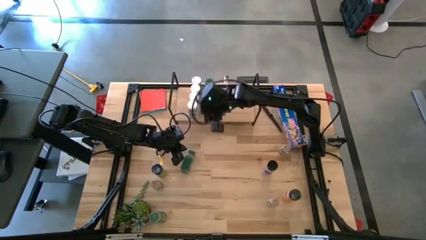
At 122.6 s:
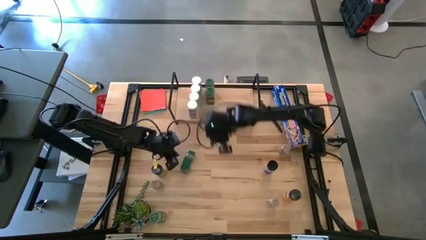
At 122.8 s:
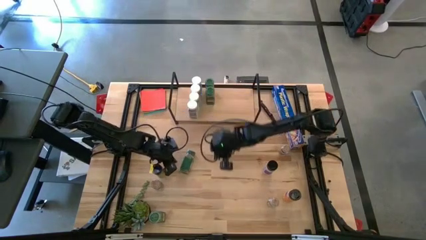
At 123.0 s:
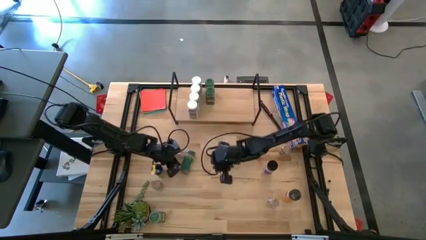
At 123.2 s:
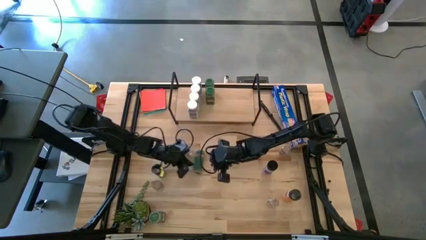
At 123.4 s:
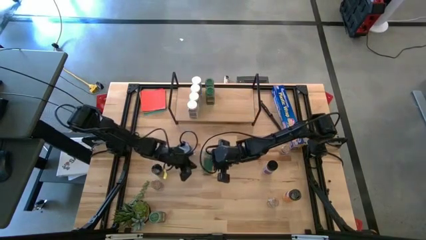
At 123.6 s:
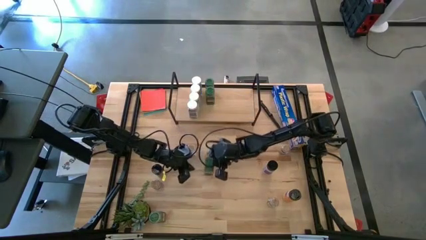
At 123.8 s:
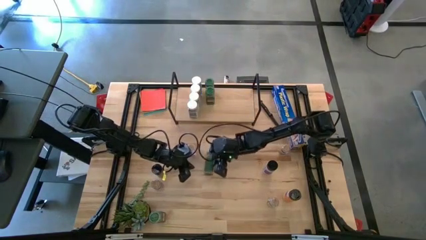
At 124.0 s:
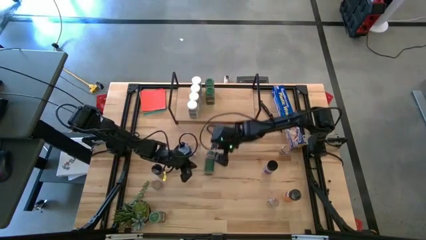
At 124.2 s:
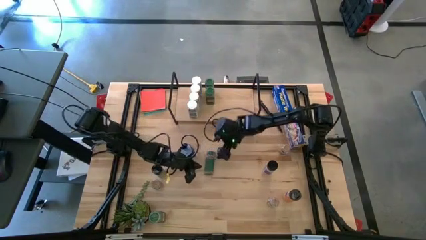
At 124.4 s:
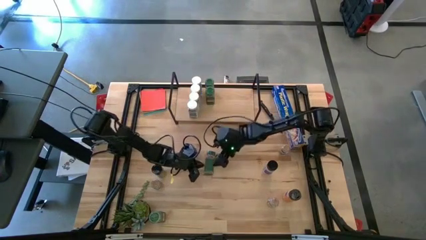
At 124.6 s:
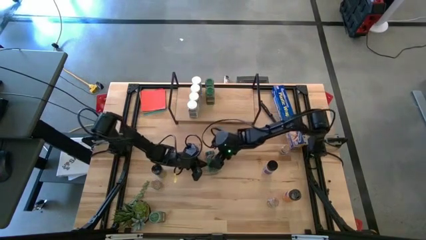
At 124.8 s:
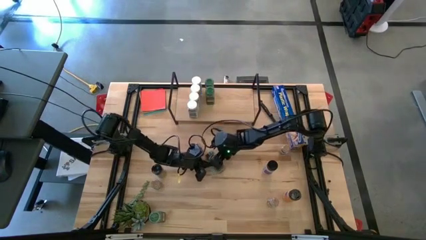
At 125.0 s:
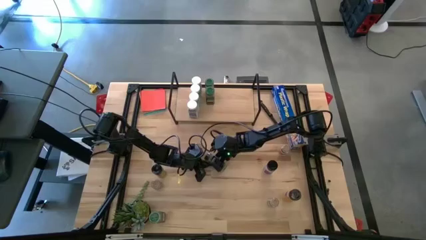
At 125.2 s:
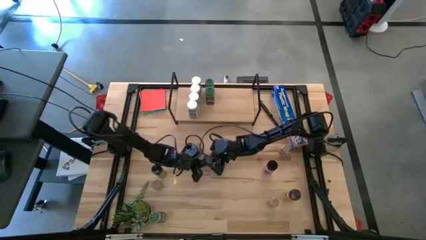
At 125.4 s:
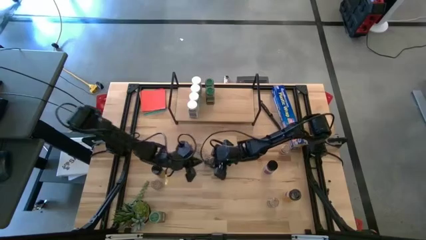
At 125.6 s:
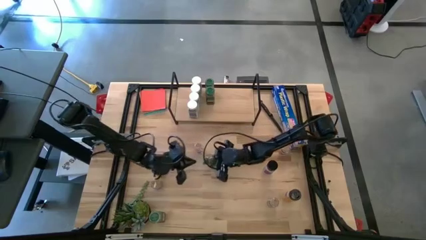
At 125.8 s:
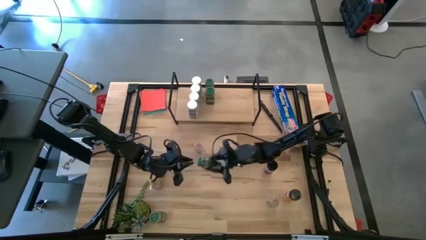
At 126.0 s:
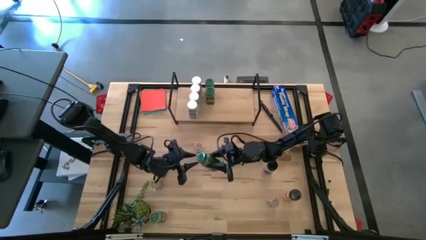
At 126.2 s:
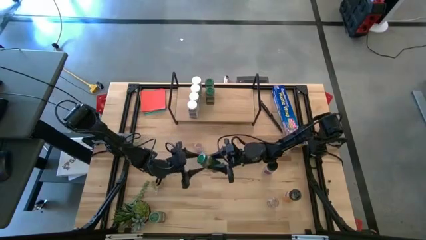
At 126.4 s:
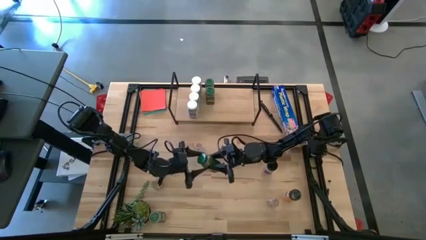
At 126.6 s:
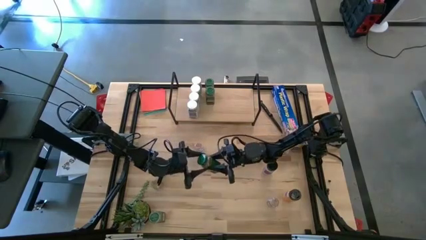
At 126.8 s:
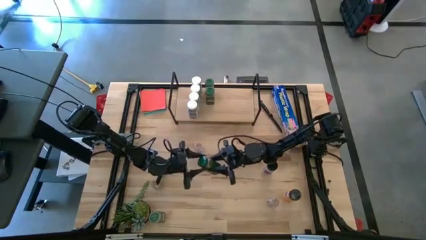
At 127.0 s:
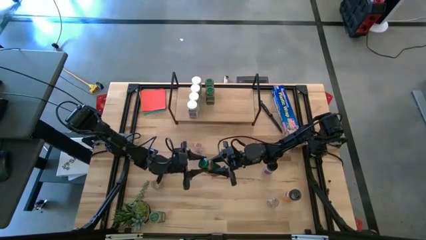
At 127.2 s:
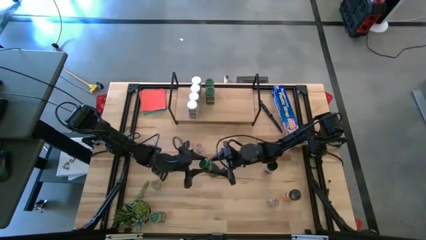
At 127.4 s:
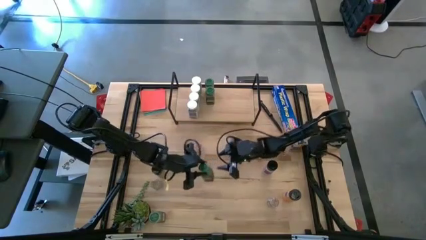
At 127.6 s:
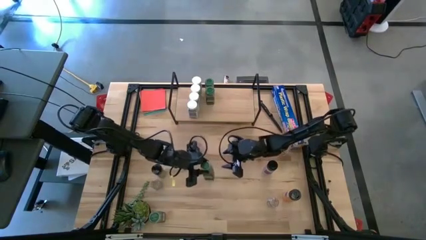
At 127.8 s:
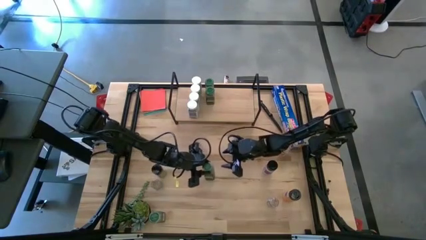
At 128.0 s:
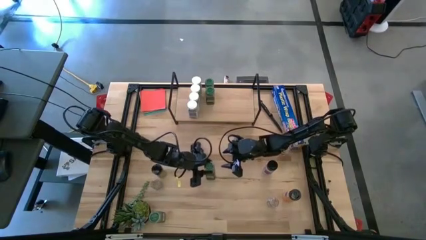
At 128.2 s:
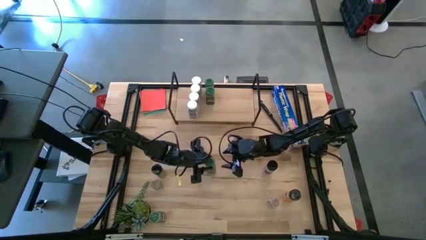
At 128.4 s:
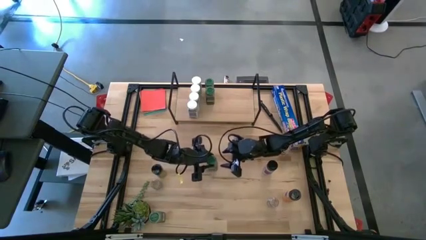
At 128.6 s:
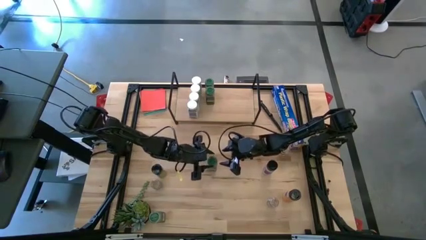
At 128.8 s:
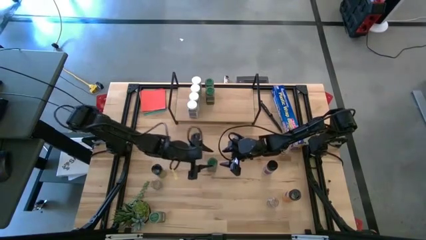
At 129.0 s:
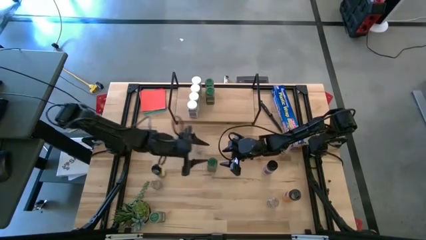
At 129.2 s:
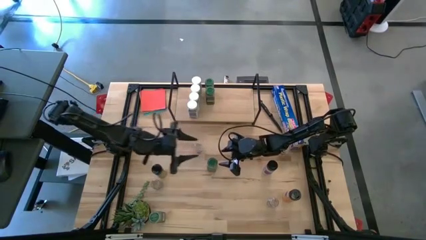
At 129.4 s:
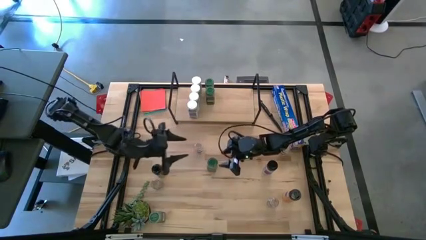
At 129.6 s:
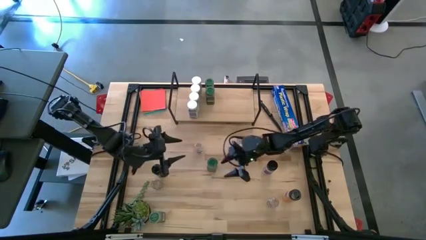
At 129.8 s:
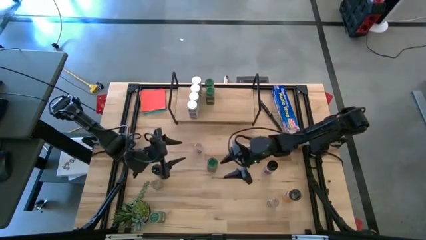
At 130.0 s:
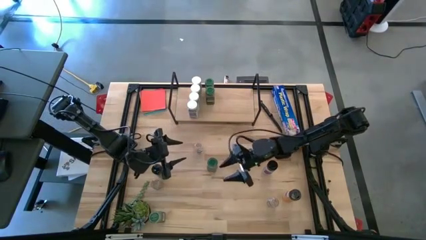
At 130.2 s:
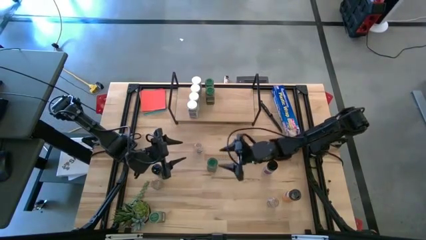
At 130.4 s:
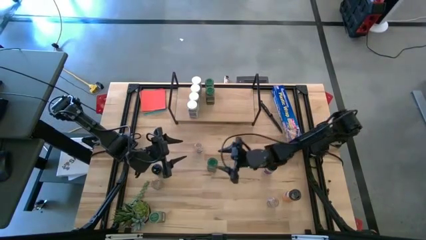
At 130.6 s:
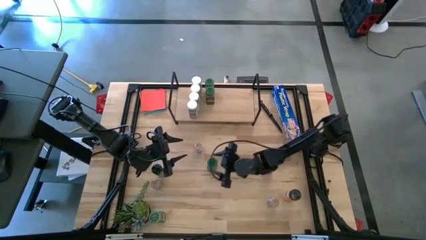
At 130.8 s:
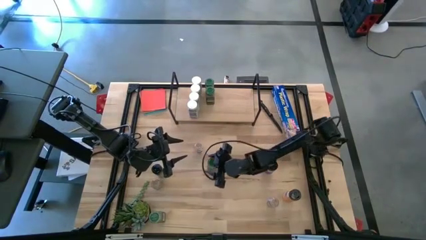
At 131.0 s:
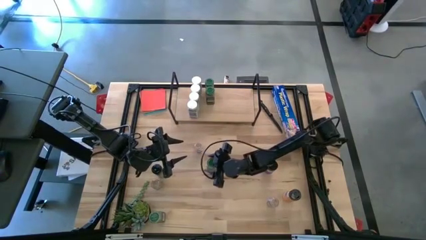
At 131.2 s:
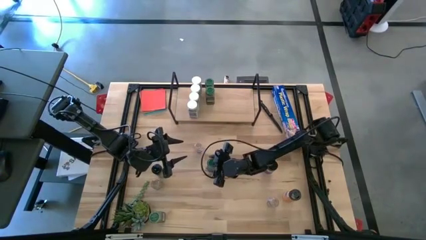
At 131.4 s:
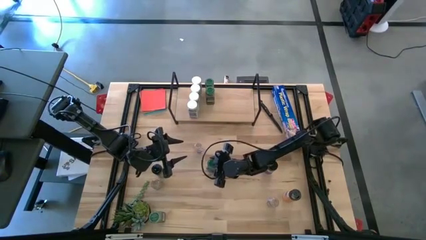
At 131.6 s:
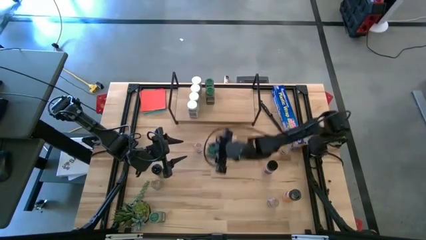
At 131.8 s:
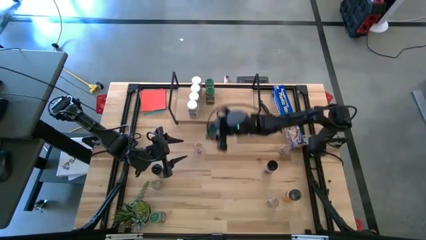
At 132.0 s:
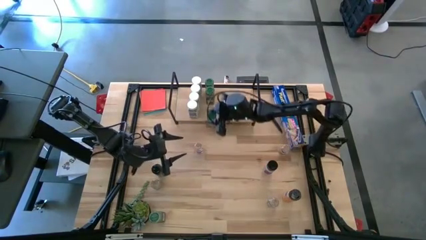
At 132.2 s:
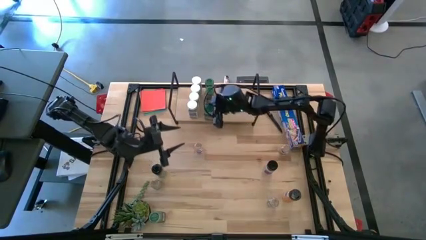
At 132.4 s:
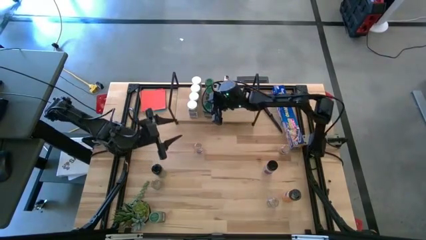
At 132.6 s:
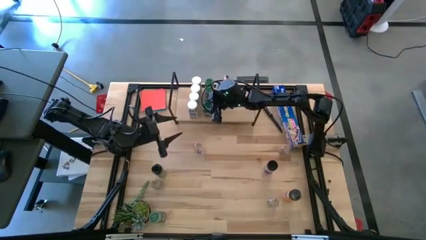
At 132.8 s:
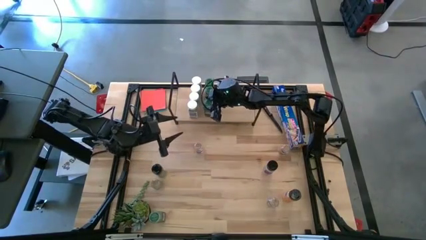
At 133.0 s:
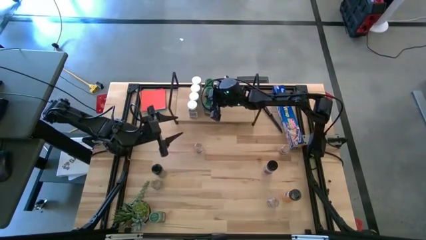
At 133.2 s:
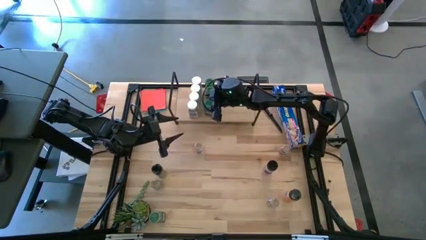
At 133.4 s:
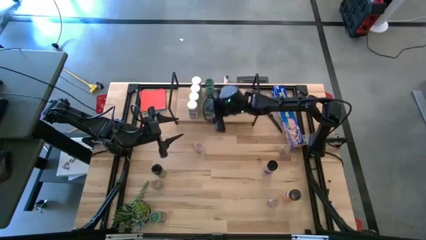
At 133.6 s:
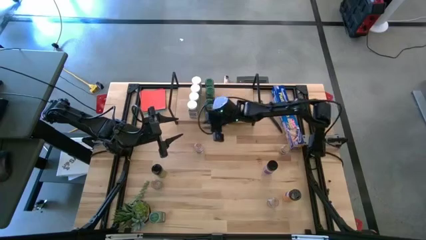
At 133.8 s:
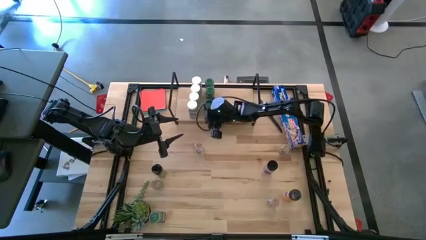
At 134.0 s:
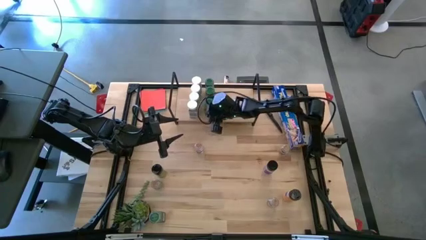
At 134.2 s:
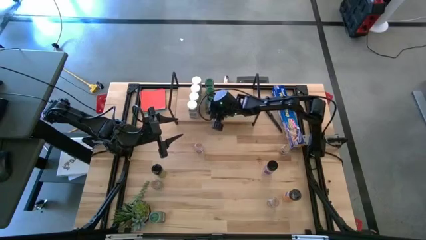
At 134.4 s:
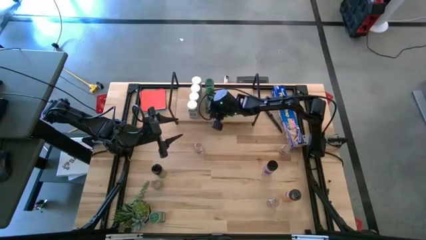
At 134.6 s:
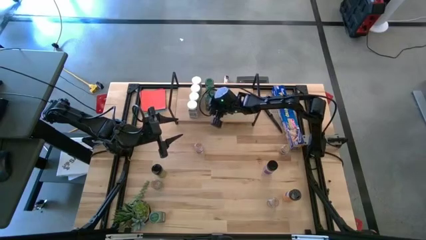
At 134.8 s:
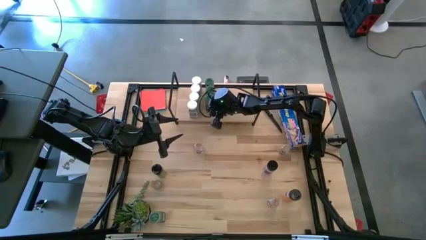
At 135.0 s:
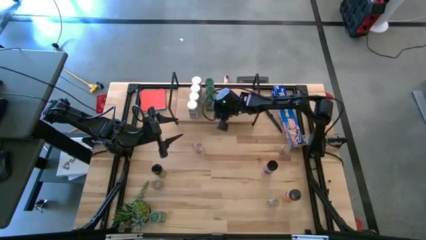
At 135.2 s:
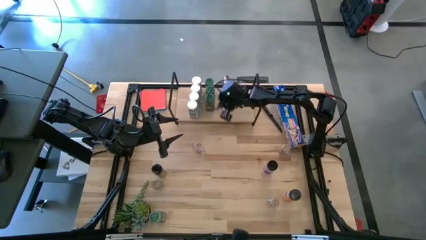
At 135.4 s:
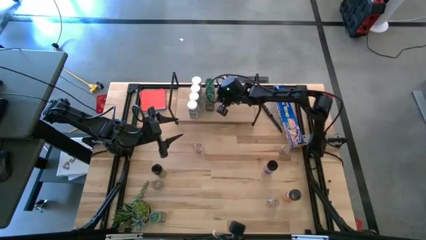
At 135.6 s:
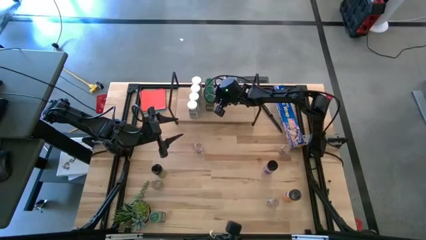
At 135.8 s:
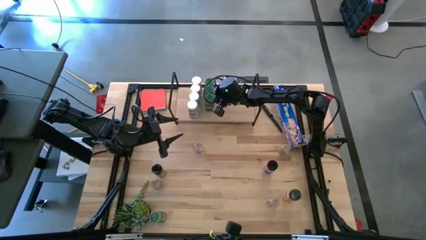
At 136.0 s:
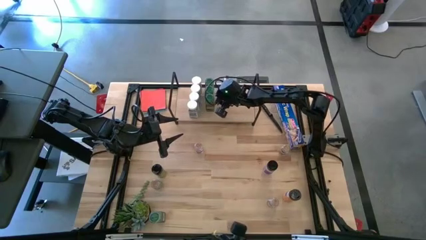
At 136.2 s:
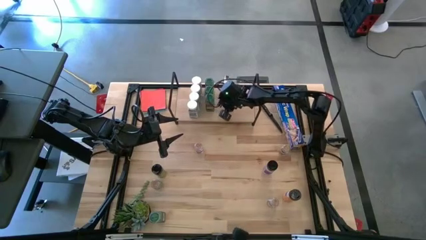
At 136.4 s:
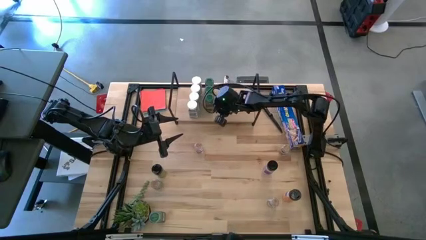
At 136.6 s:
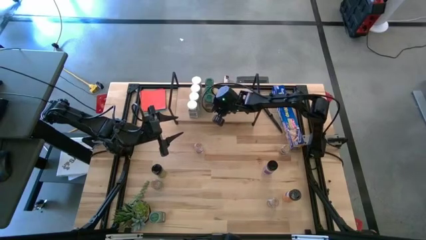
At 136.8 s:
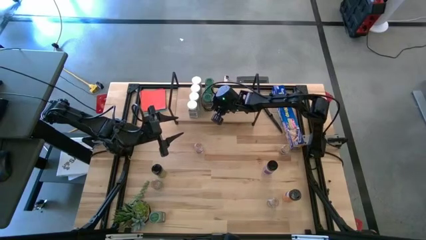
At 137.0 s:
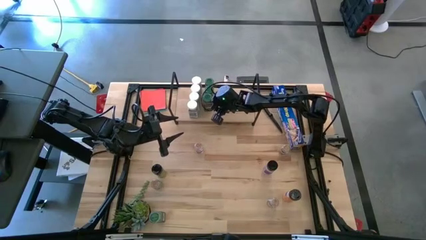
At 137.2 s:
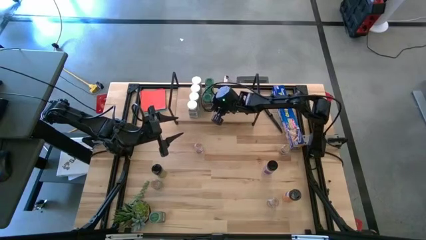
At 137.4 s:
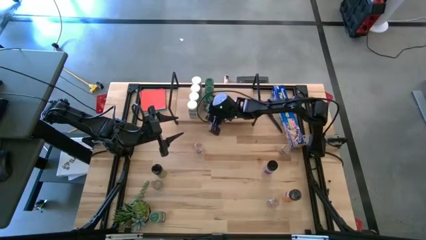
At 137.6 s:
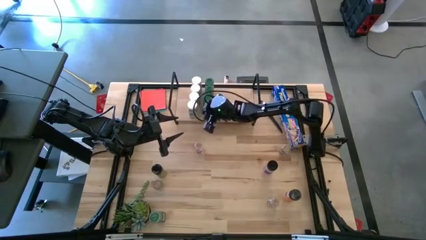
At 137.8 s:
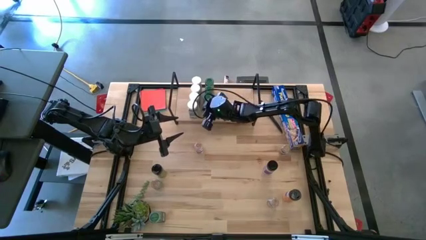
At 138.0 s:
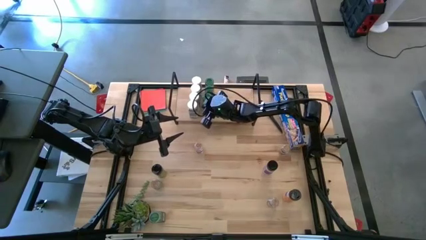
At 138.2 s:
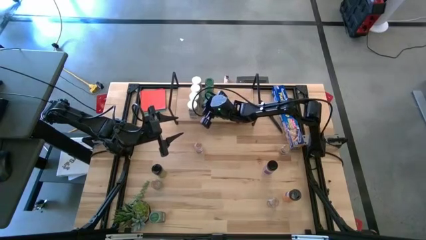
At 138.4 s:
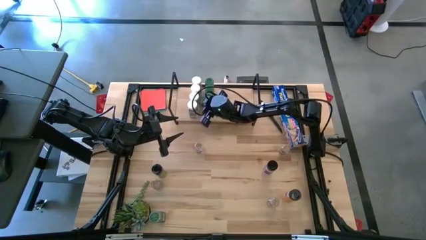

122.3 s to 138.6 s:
Task: Shelf spices
Put the top green seasoning bottle on the shelf
